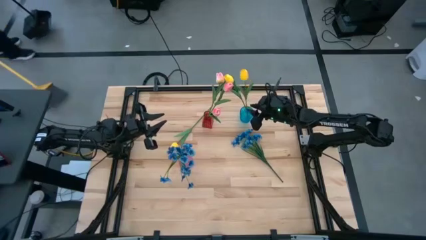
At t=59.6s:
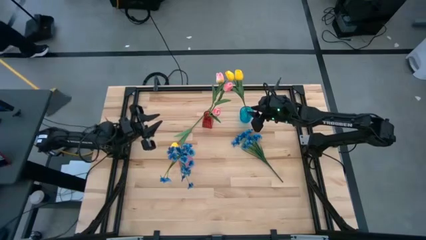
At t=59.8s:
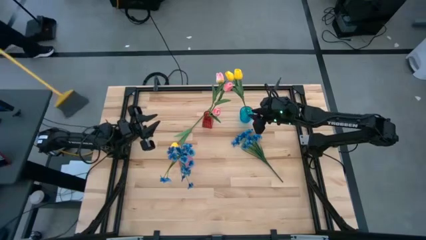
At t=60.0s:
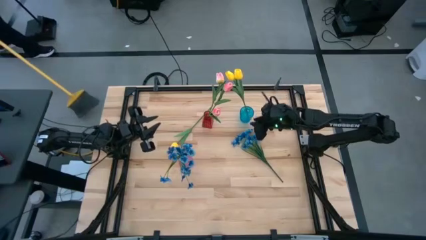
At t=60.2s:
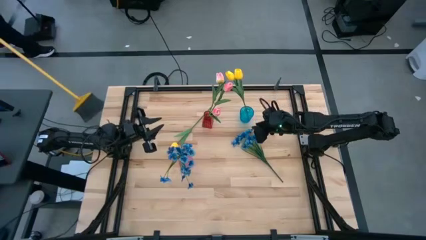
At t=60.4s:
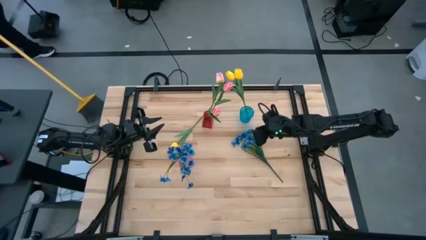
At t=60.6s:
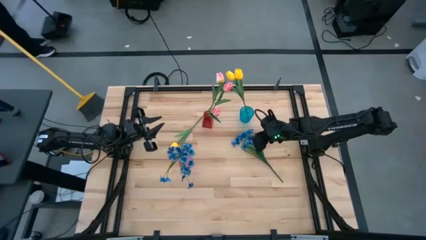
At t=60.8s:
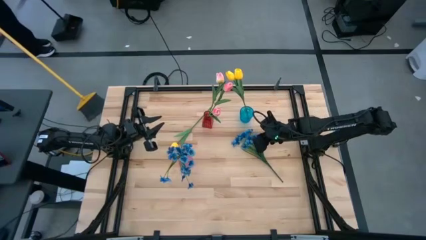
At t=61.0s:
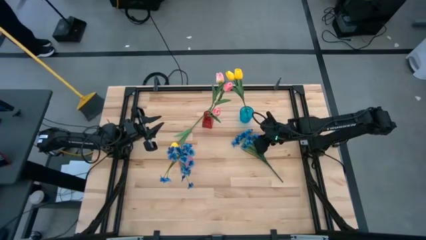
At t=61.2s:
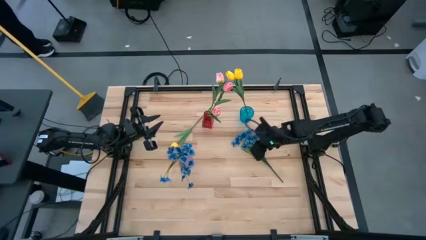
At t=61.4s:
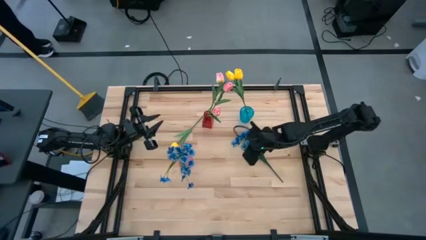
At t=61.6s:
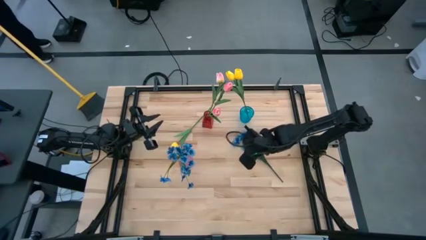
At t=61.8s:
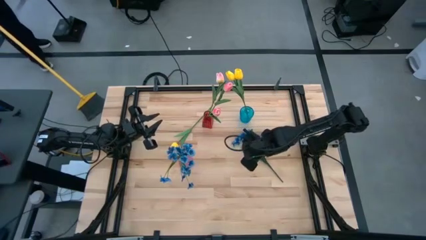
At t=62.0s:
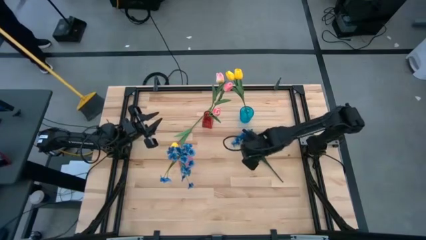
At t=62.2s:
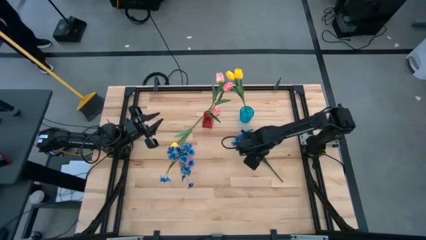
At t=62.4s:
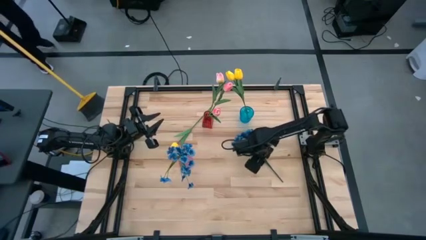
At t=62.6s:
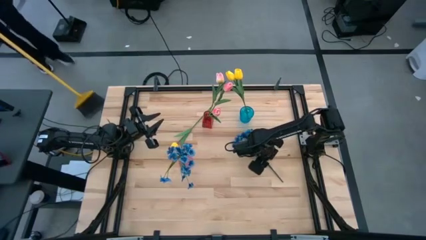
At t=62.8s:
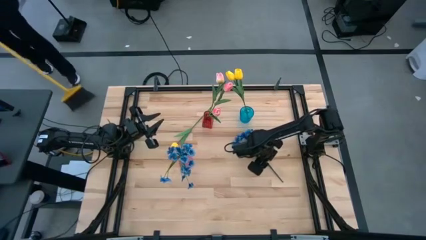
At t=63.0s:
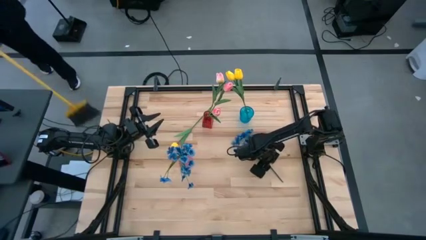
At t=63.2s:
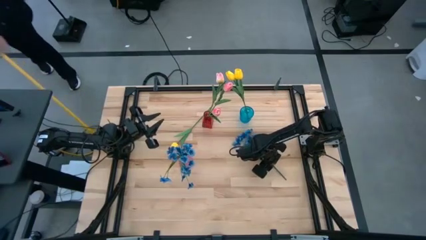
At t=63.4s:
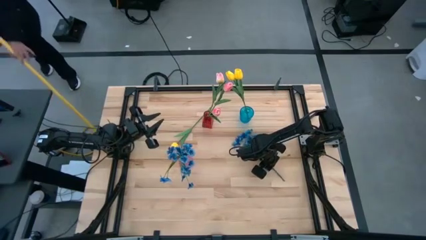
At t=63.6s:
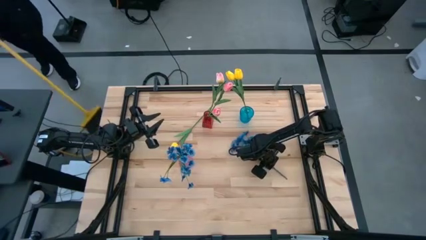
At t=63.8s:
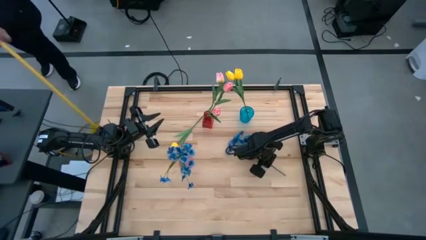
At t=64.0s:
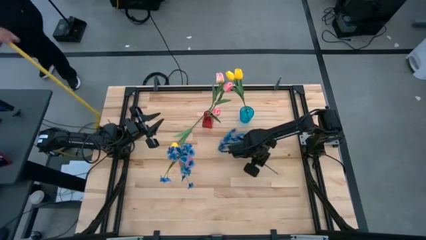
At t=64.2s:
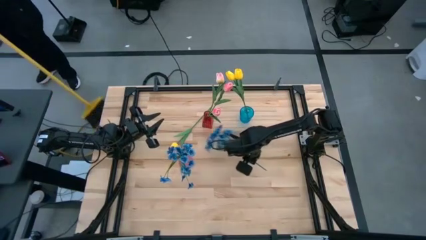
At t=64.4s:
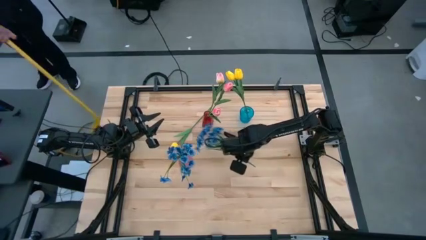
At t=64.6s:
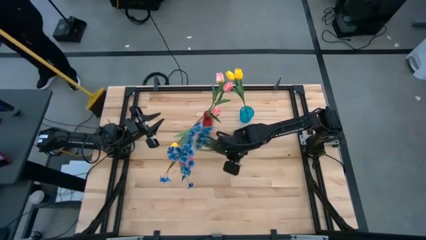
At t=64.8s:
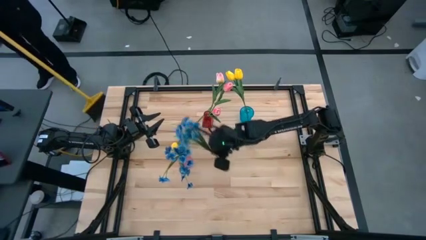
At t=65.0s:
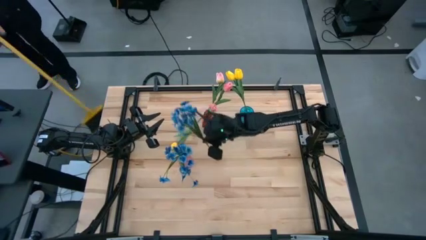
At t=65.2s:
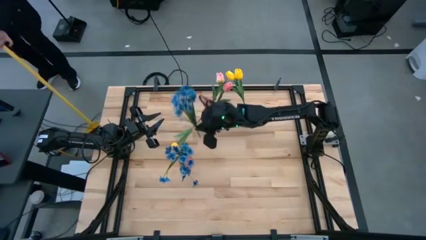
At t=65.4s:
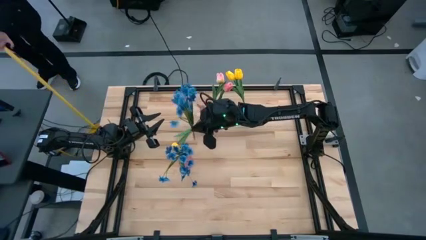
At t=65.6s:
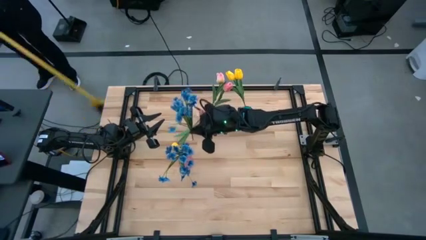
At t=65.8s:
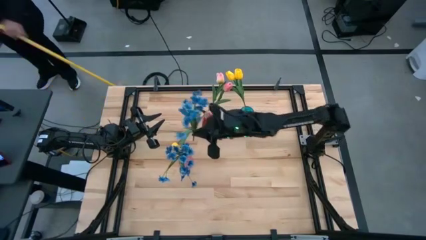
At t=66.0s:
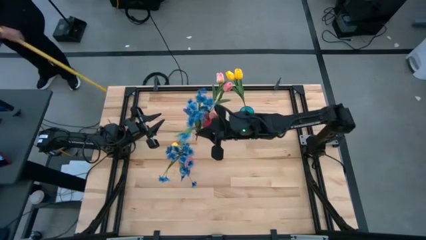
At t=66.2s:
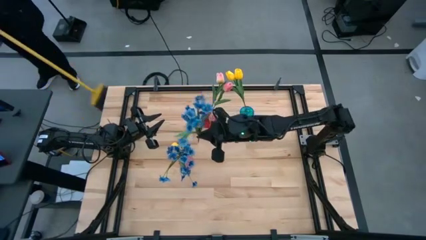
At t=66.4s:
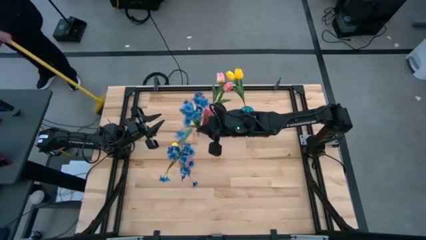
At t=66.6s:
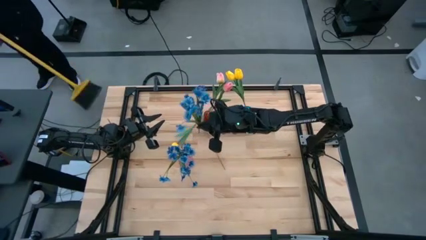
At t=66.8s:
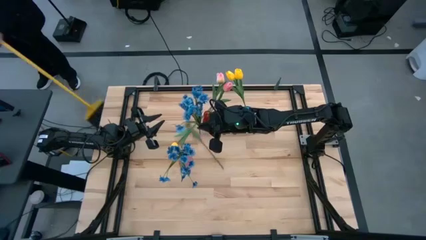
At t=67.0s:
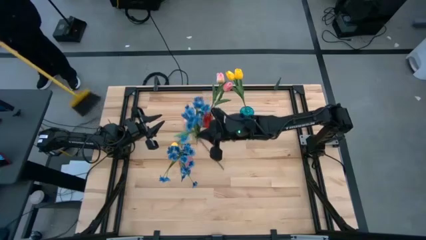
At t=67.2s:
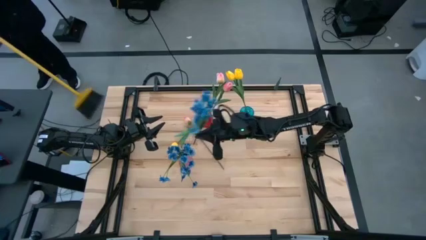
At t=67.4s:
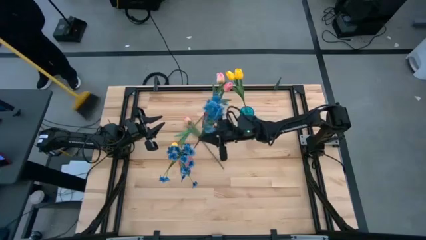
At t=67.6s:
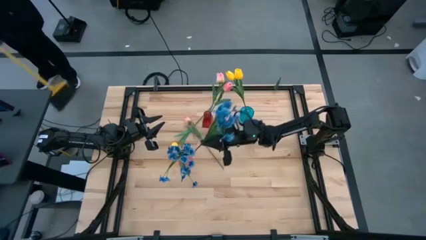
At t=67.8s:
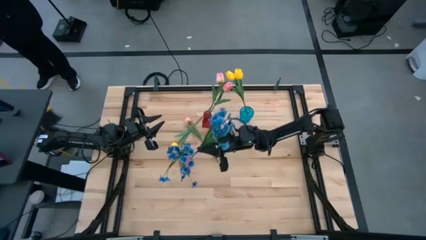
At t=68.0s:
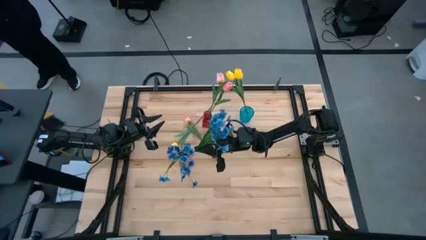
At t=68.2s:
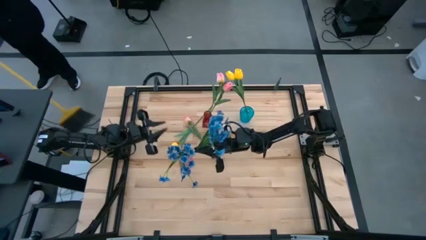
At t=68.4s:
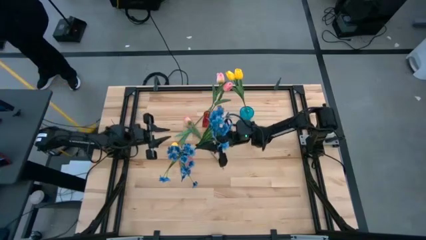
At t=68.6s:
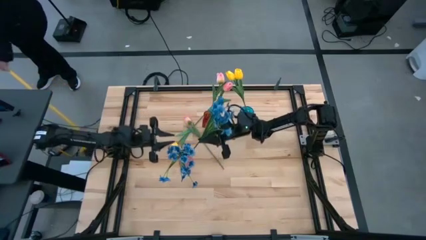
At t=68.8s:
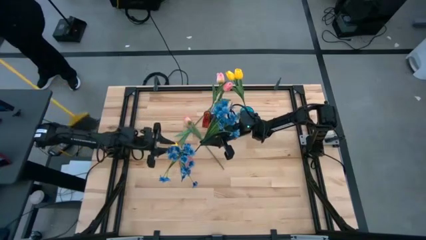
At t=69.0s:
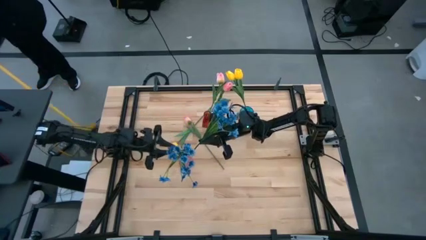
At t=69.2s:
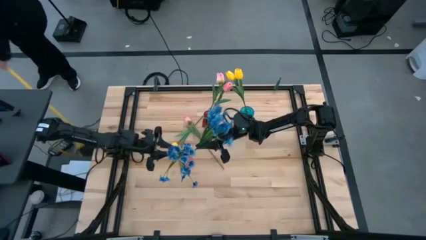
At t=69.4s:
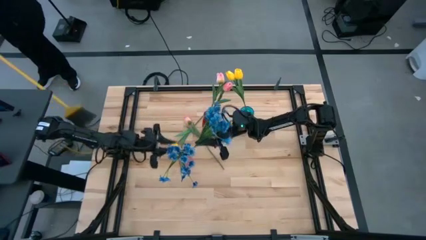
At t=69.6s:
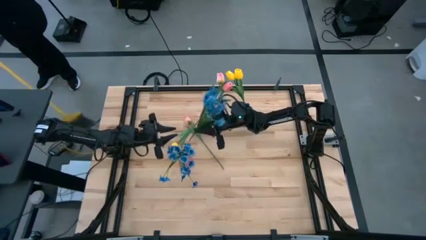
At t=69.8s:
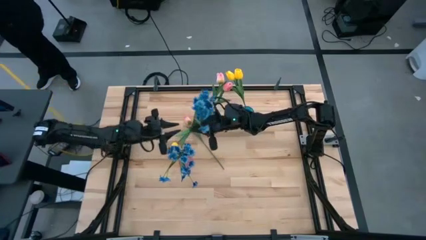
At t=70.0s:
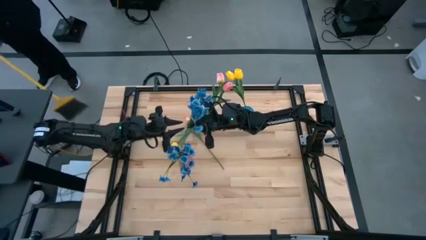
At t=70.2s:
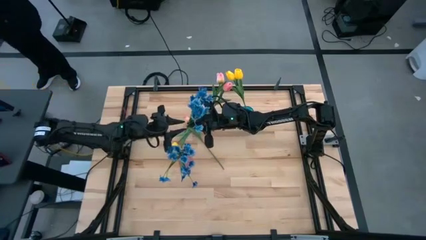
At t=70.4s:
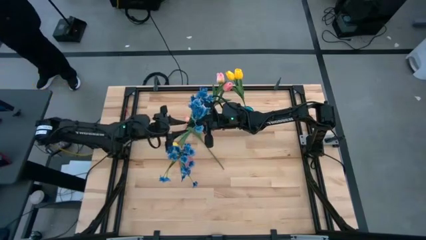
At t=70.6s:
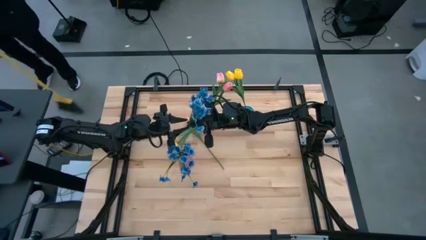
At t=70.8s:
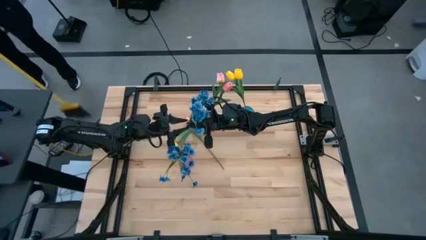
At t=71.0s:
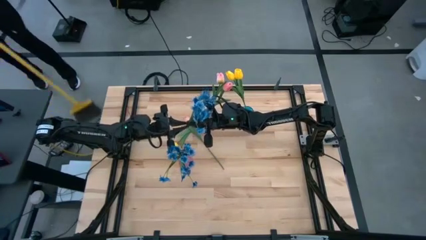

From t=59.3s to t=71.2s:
Task: Sort flowers into vase by color
Put the blue flowers into the pink vase

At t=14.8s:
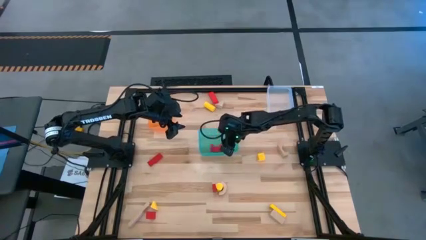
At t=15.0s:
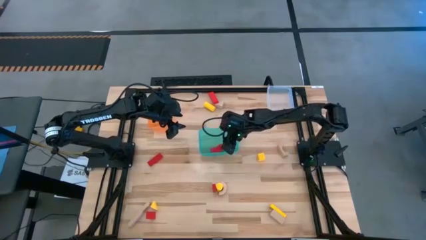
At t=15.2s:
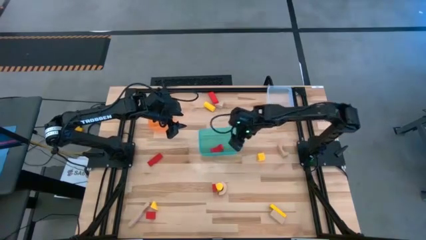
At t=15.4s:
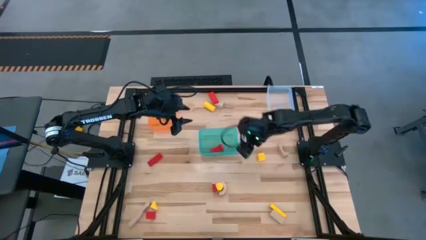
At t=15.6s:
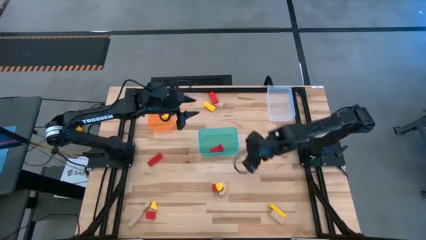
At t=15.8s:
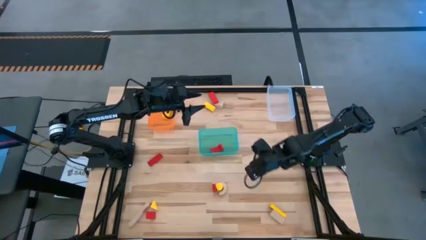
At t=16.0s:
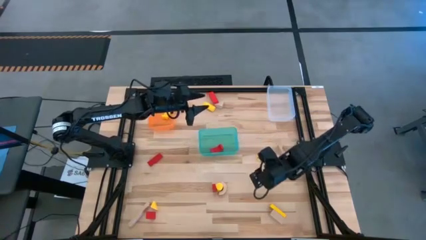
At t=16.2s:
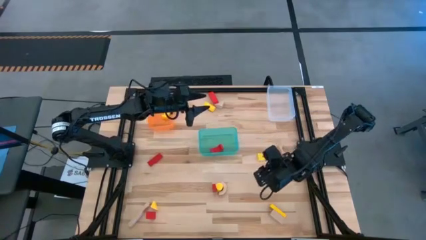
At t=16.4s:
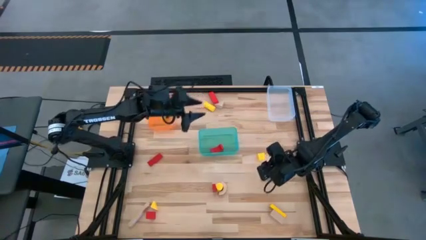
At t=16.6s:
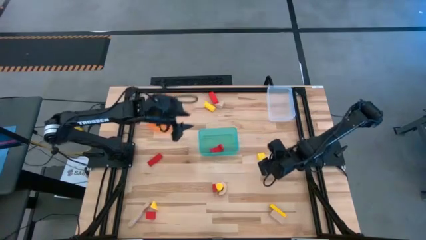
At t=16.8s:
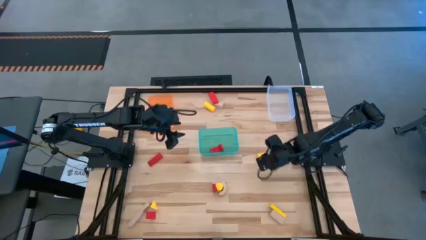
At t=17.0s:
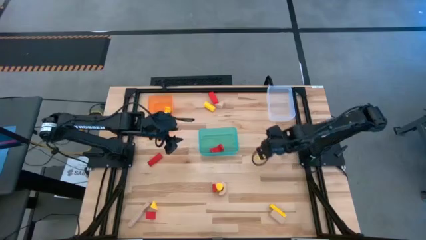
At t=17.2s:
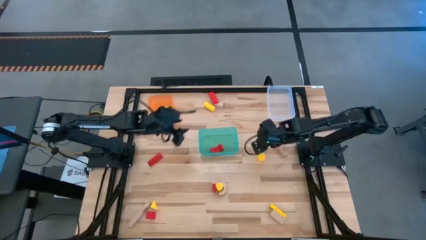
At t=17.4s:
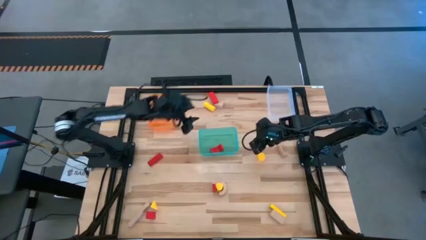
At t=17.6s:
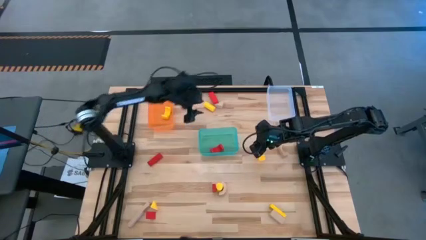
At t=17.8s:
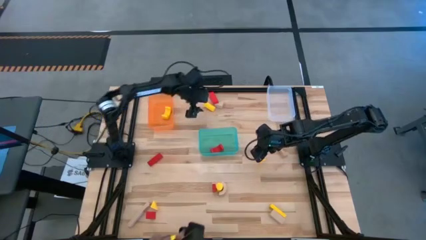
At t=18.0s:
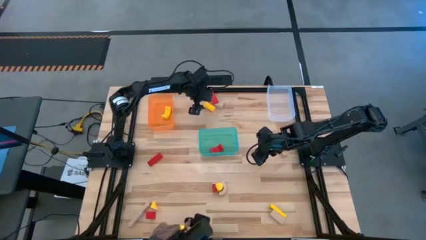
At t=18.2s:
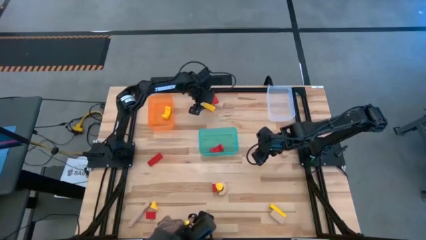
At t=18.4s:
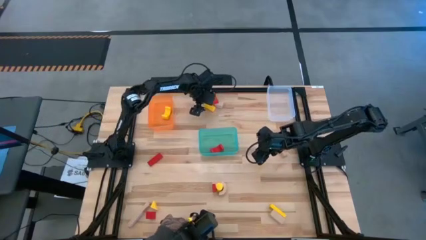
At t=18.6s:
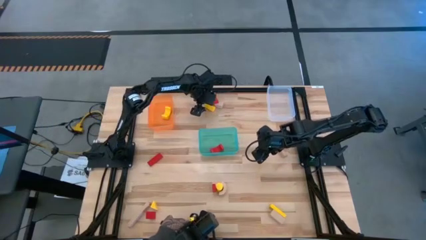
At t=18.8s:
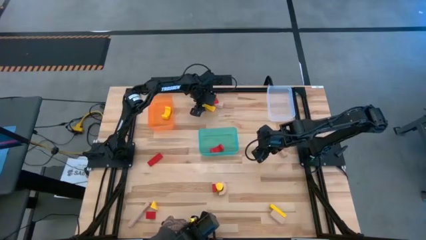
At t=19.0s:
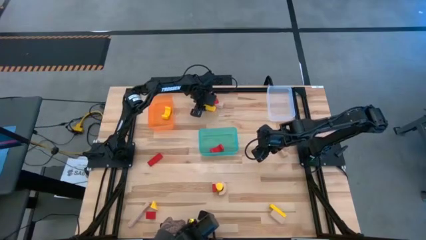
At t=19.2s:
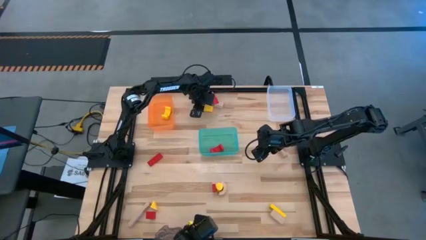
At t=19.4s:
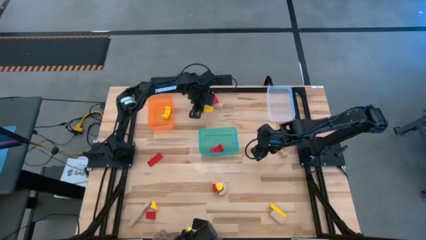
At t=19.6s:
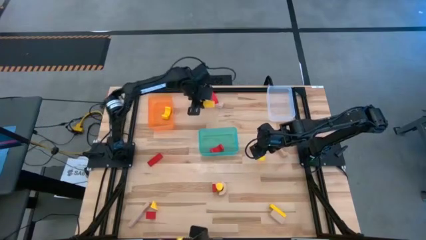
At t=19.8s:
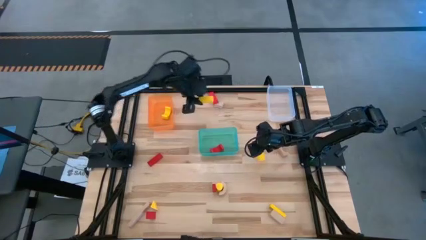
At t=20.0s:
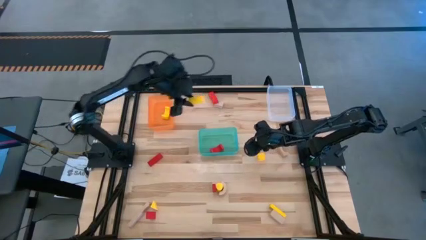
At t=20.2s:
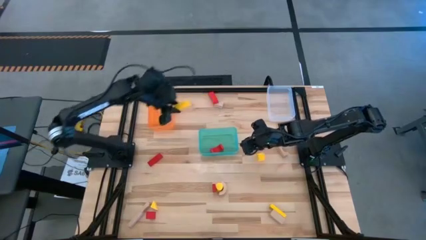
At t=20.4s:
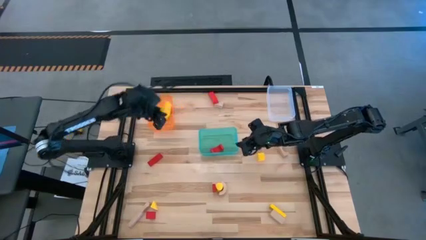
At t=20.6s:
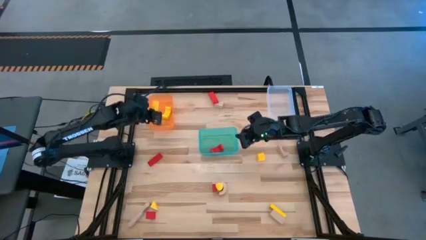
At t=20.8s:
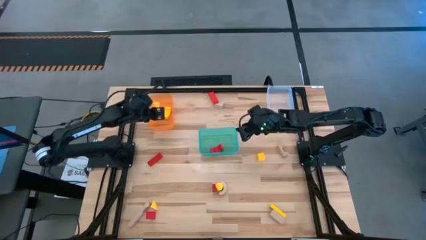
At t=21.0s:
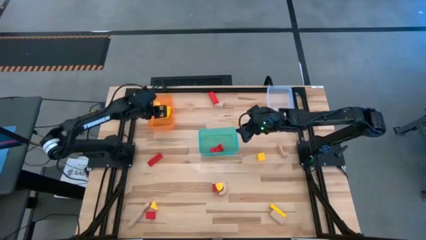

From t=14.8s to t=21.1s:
Task: Sort & place blocks by color
Put the yellow block into the orange bin
